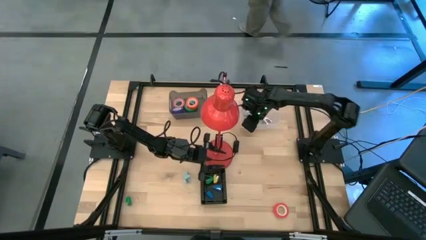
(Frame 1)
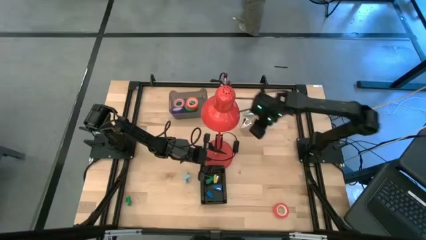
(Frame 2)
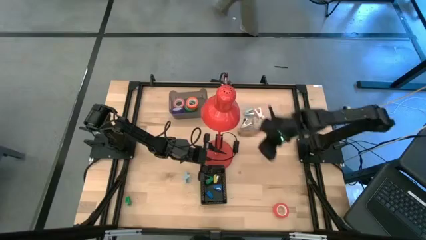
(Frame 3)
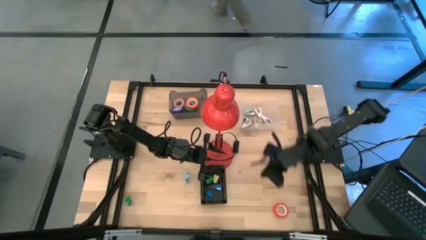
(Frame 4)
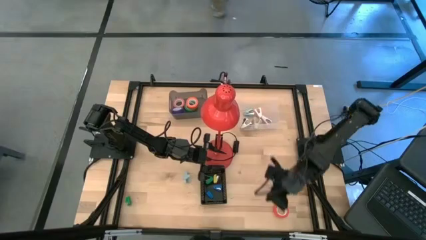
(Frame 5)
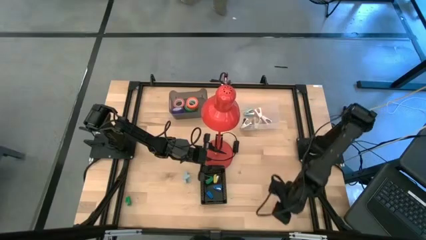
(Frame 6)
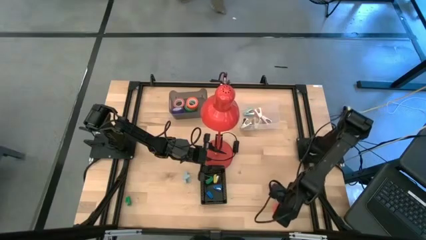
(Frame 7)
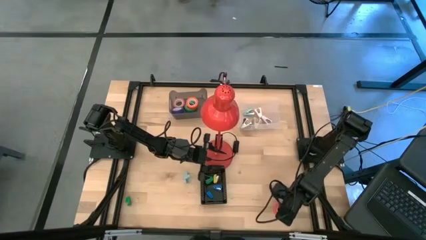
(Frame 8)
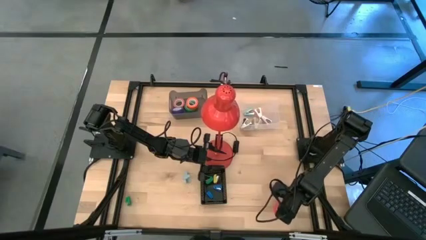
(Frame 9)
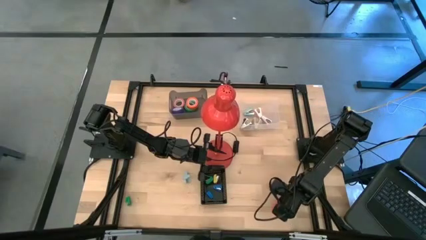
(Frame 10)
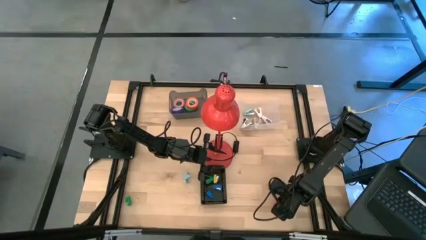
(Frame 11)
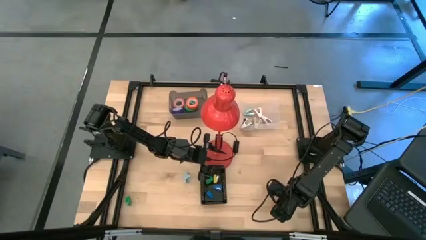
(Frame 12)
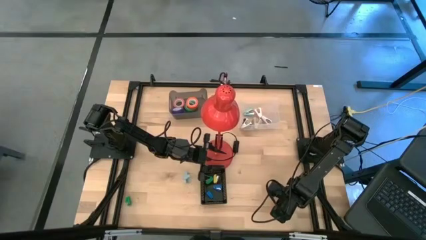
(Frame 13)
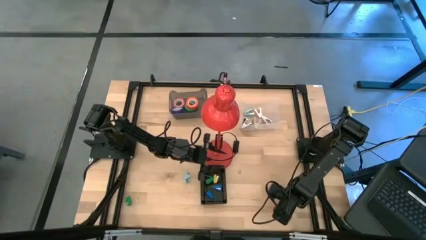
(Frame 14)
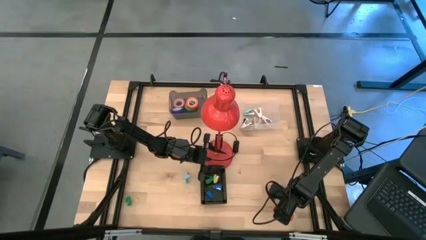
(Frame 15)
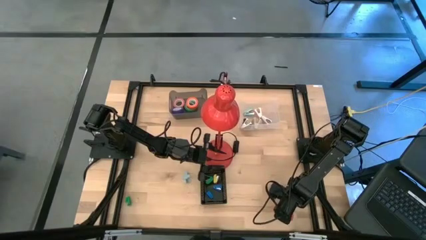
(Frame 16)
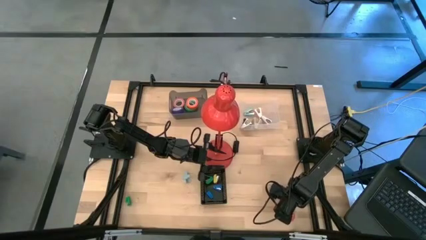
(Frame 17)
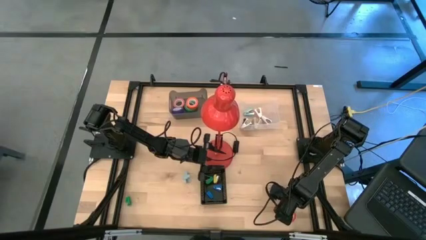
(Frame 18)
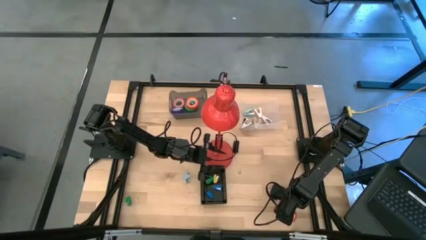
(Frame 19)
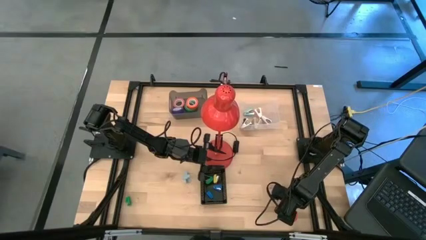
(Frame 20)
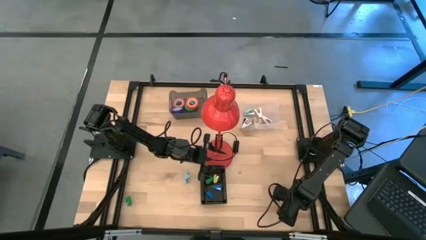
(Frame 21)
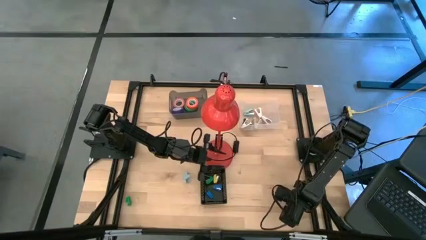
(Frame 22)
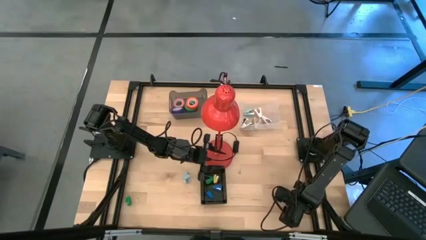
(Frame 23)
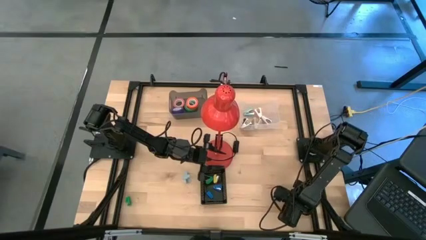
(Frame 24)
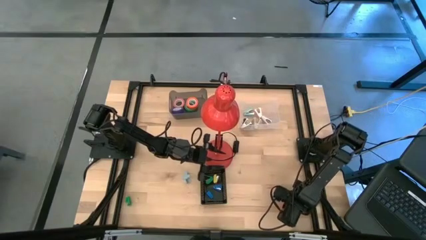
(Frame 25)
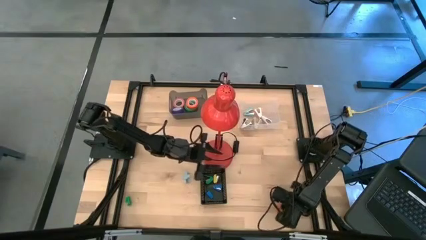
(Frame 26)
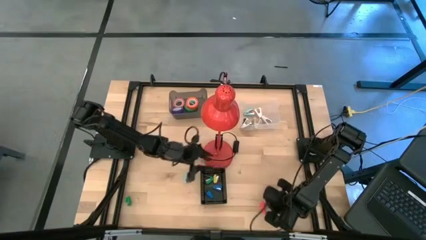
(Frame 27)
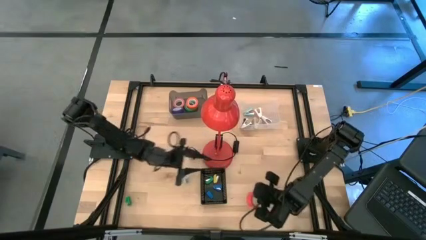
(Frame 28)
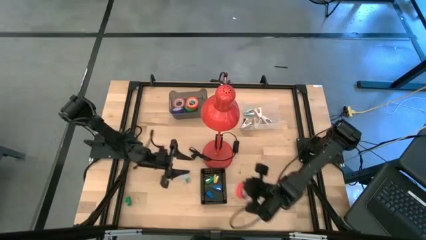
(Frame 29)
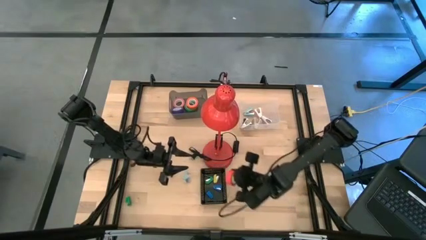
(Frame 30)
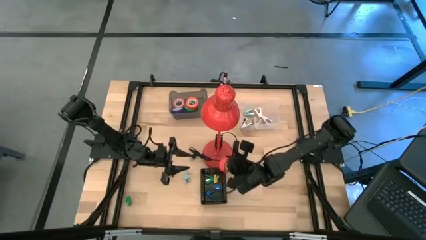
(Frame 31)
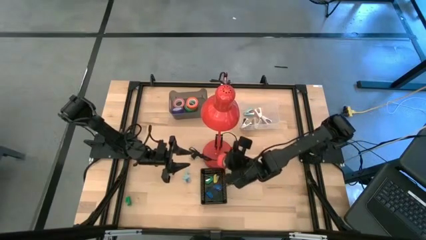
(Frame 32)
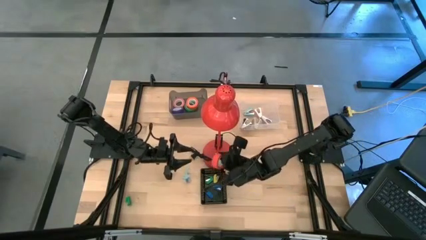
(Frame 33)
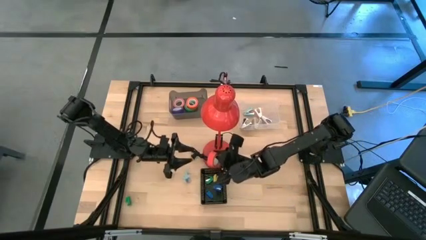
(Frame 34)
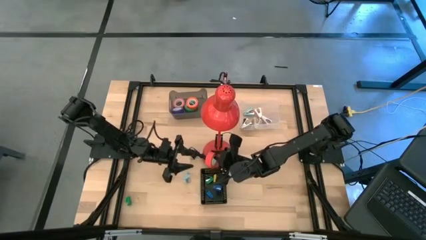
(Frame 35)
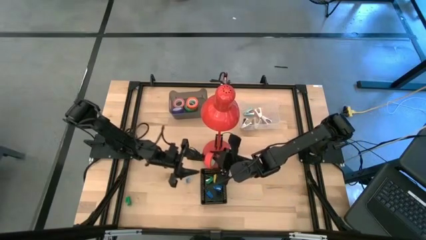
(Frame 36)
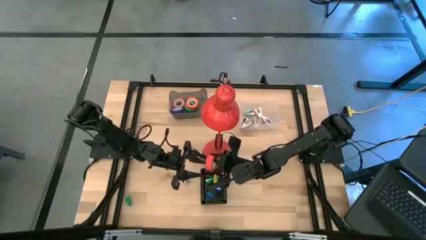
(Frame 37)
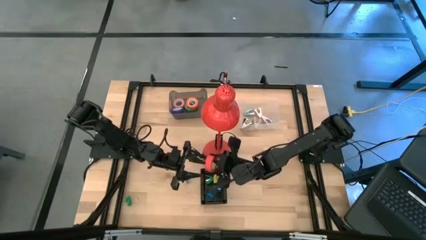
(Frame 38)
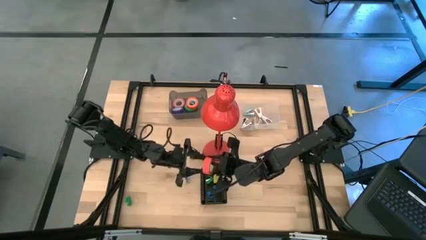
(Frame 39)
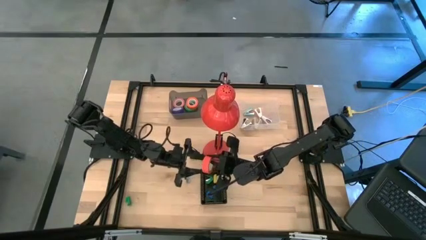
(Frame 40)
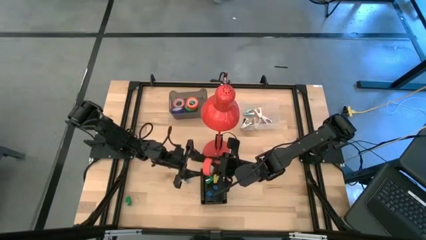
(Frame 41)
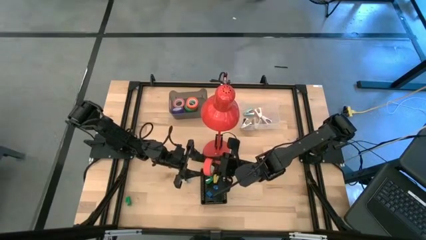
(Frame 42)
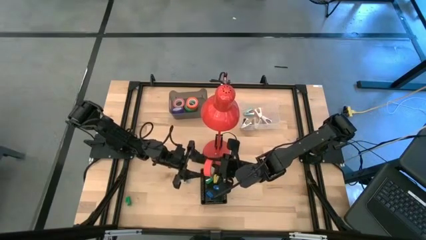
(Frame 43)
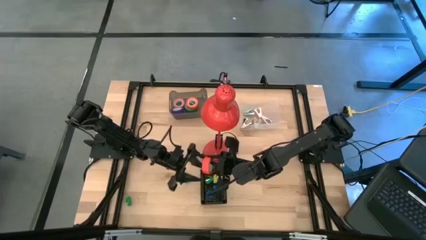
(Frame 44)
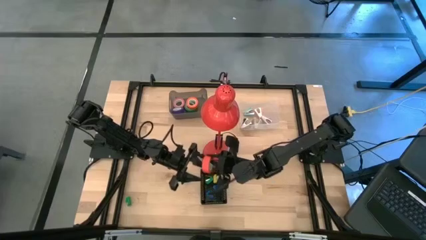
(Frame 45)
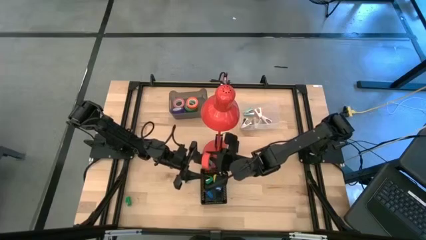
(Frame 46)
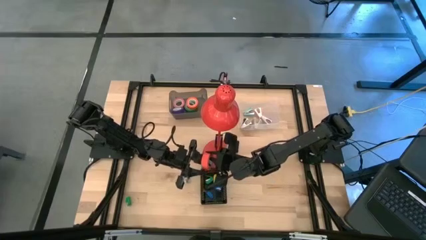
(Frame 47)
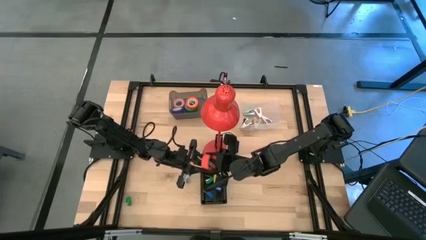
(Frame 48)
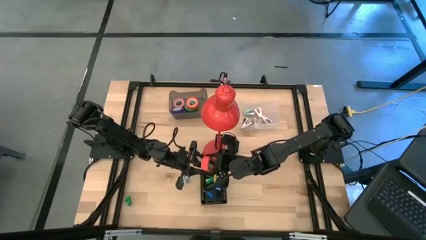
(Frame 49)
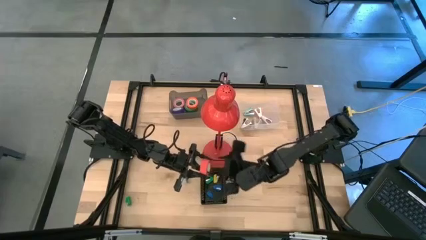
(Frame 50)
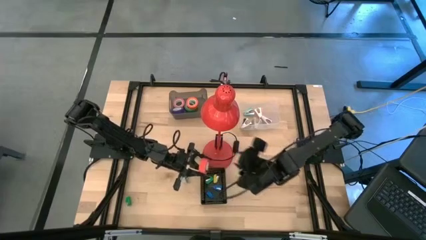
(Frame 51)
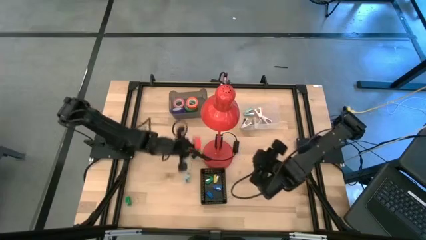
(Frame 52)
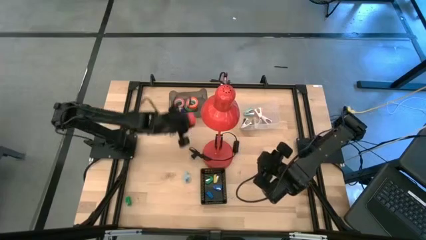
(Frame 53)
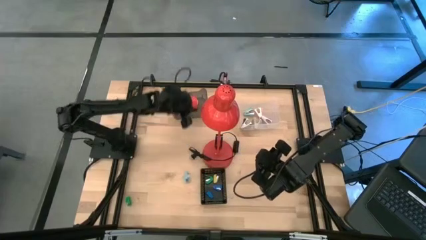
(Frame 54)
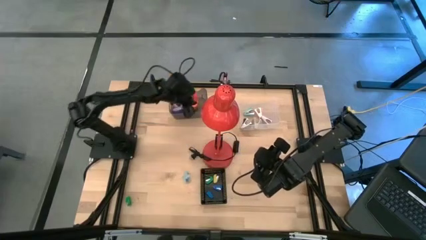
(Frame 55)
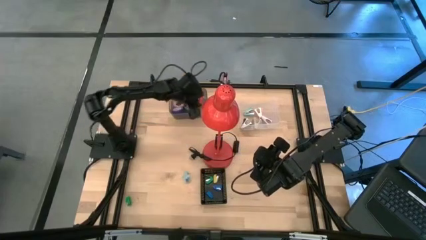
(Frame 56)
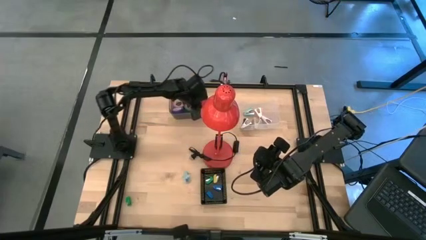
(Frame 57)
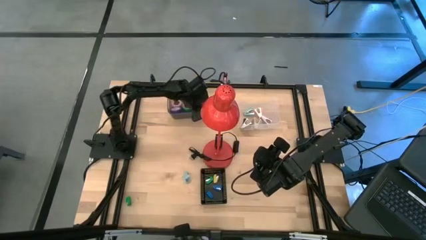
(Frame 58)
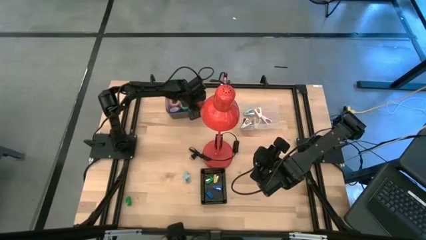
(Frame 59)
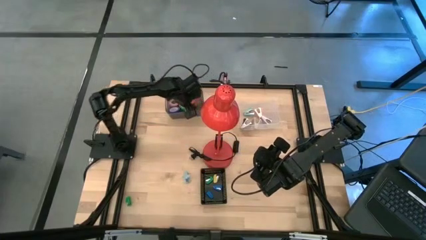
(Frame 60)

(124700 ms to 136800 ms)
Task: Pick and place Stapler, Stapler remover, tape
Put the orange tape into the black transparent bin

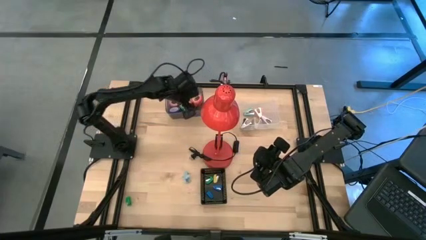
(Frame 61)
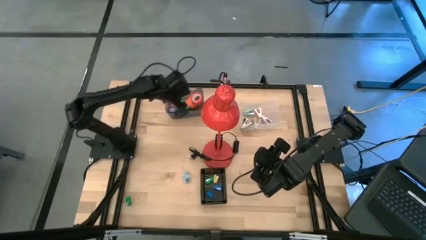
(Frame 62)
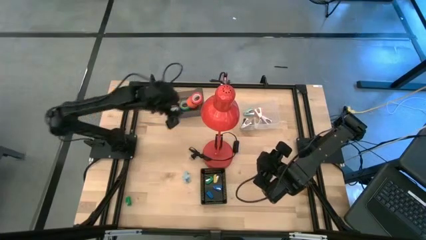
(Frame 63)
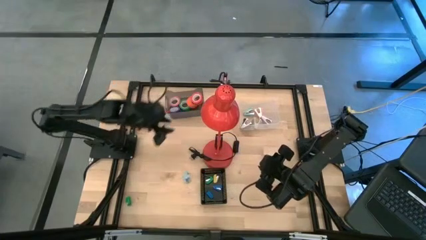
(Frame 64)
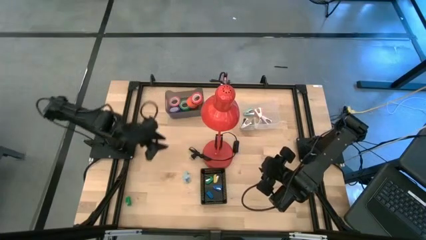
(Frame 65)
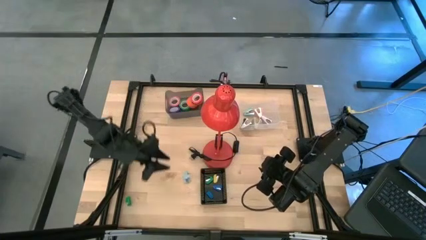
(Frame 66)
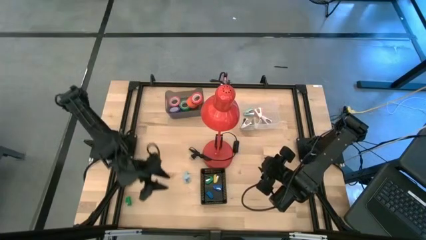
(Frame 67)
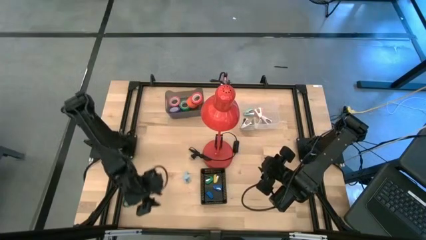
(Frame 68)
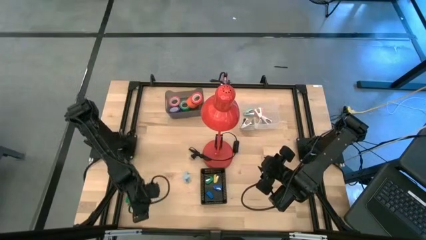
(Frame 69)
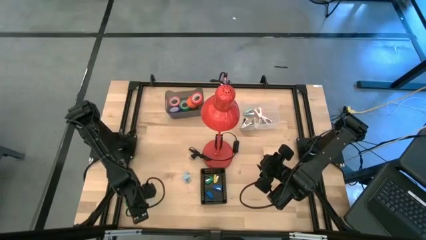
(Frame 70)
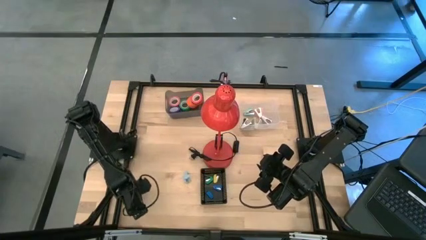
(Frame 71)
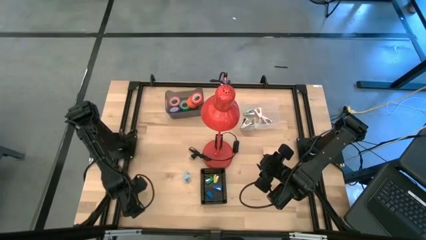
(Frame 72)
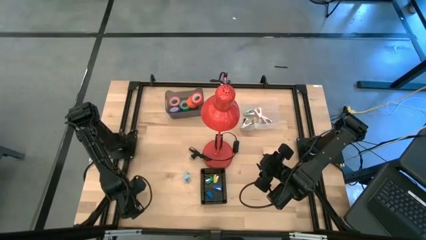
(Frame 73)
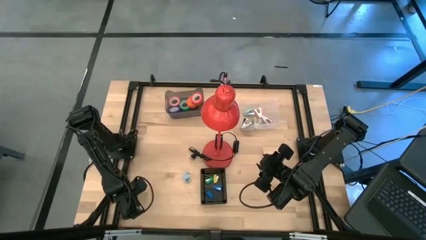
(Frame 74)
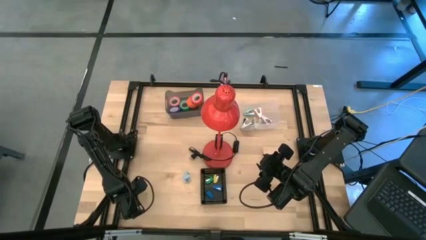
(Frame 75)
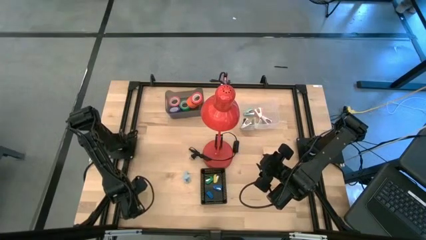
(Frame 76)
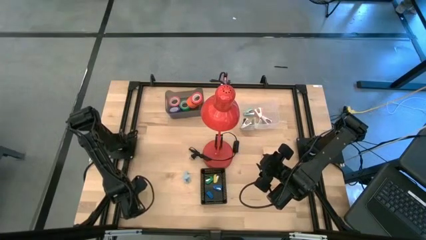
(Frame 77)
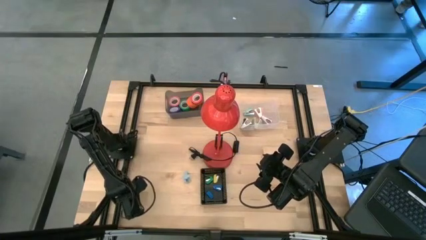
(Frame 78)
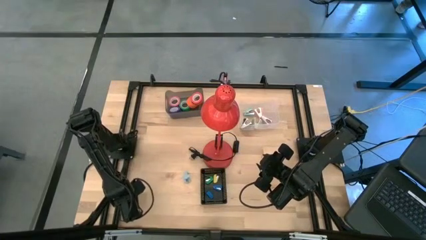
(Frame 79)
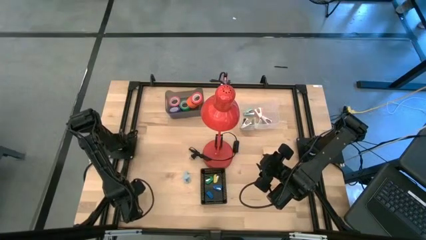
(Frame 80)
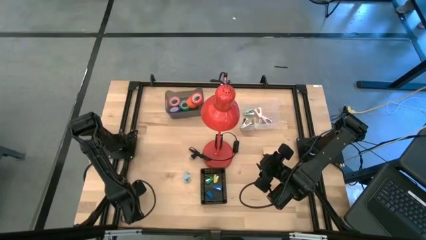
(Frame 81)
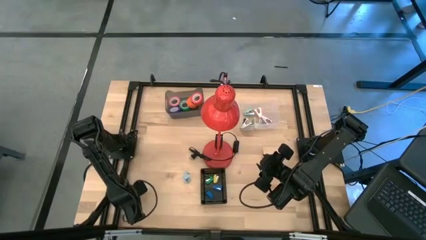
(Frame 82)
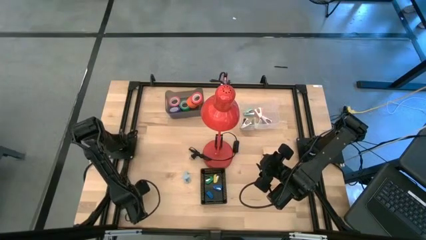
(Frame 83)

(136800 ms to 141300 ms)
Put the green stapler into the black bin
